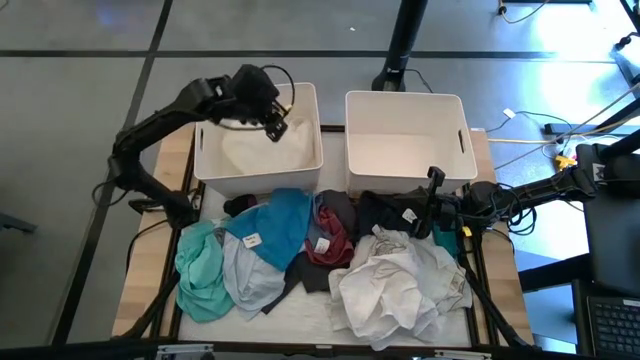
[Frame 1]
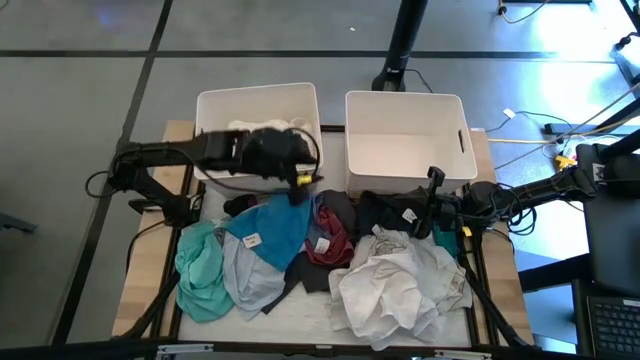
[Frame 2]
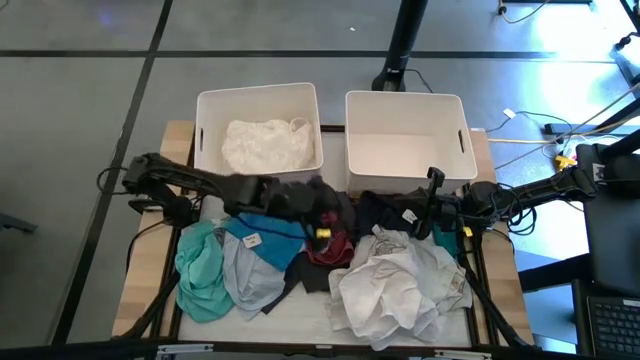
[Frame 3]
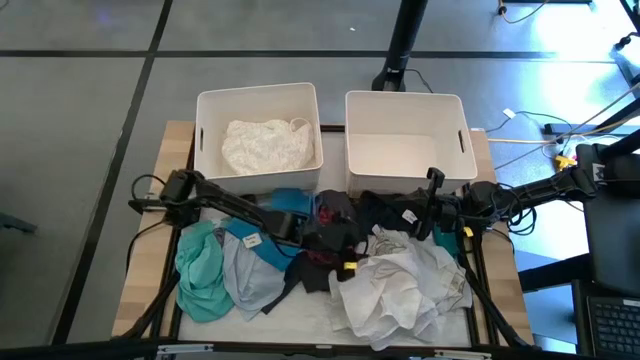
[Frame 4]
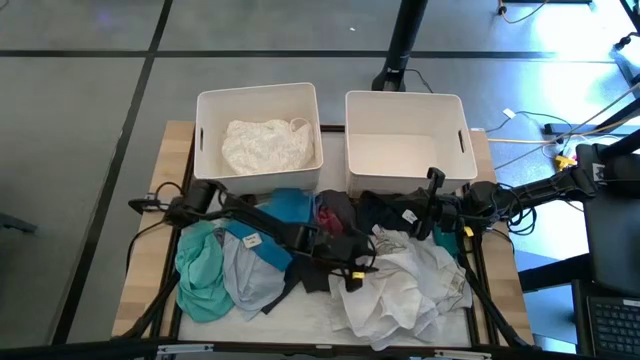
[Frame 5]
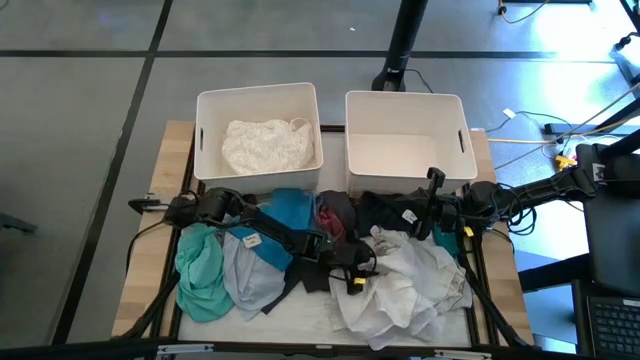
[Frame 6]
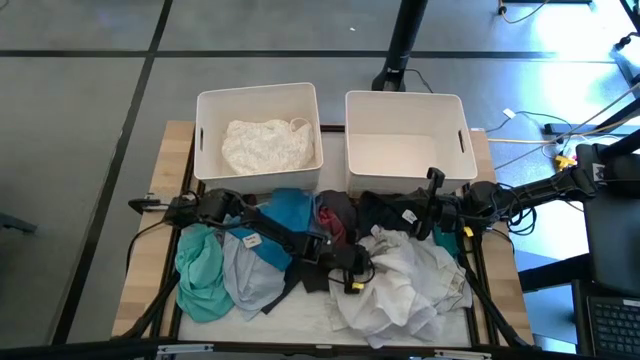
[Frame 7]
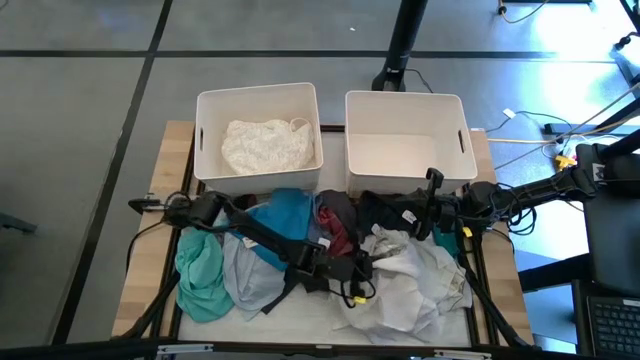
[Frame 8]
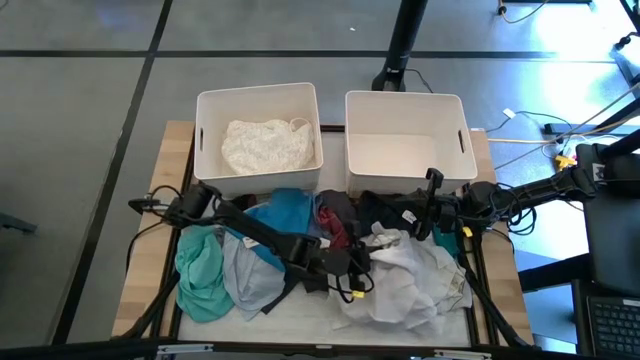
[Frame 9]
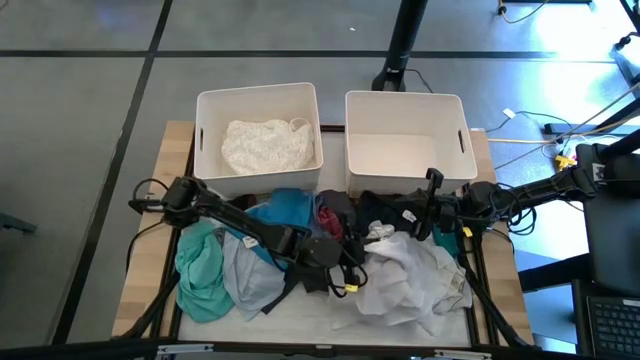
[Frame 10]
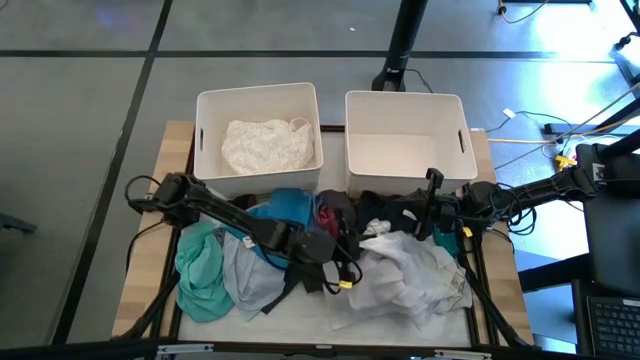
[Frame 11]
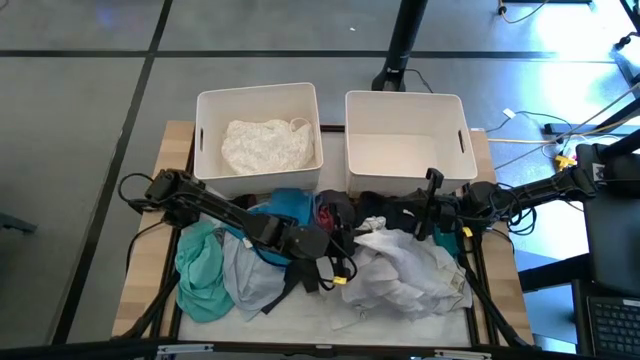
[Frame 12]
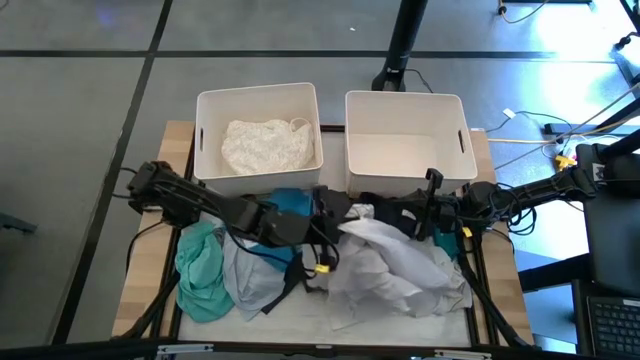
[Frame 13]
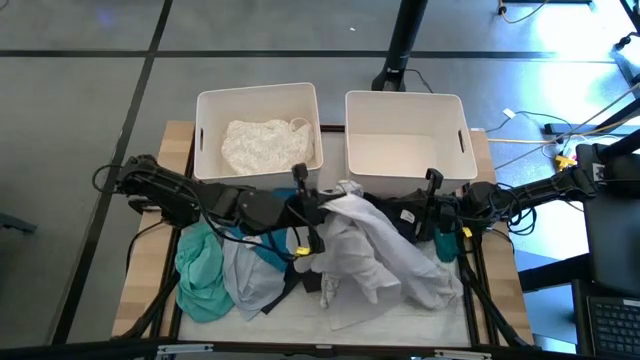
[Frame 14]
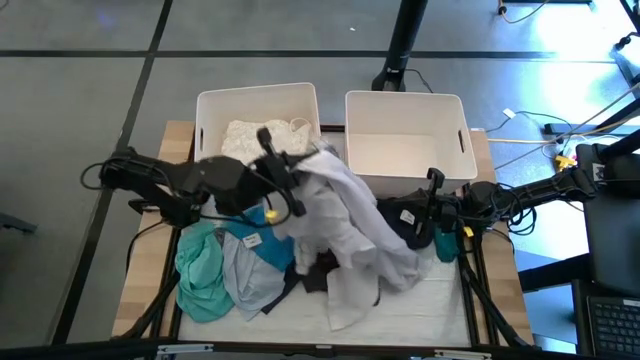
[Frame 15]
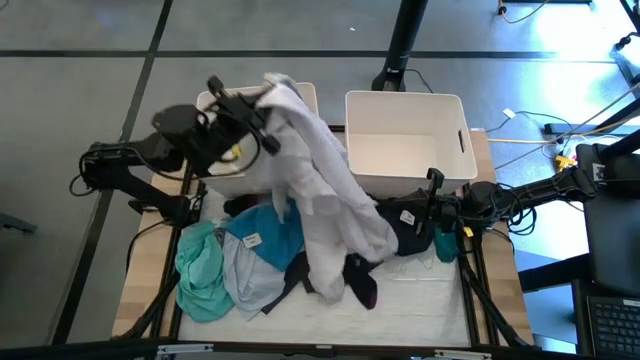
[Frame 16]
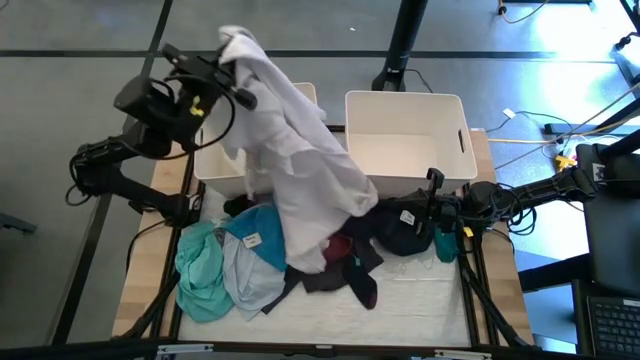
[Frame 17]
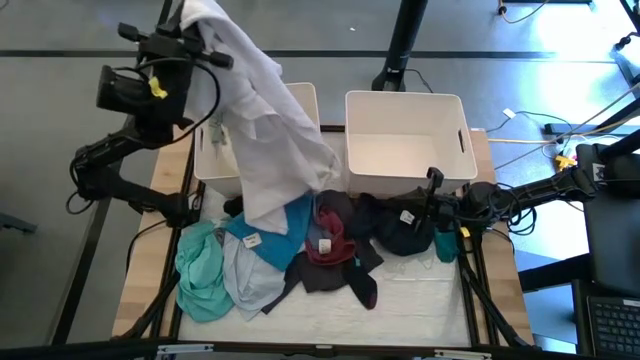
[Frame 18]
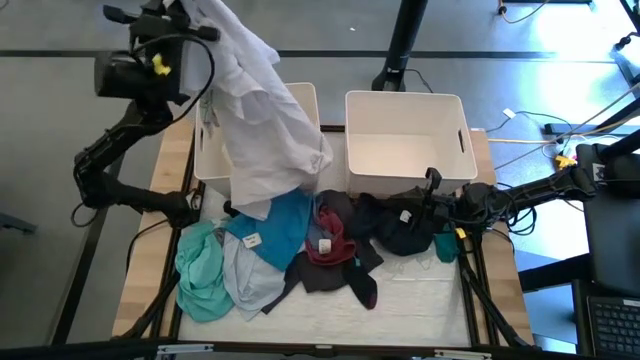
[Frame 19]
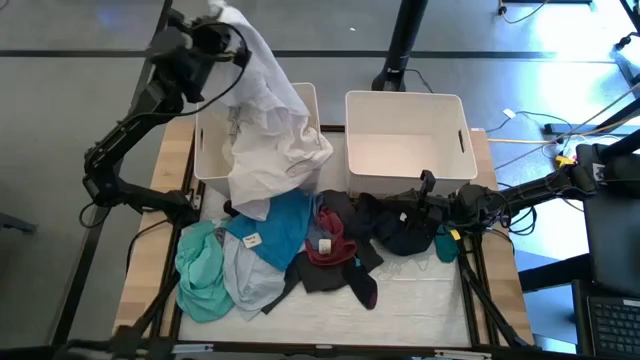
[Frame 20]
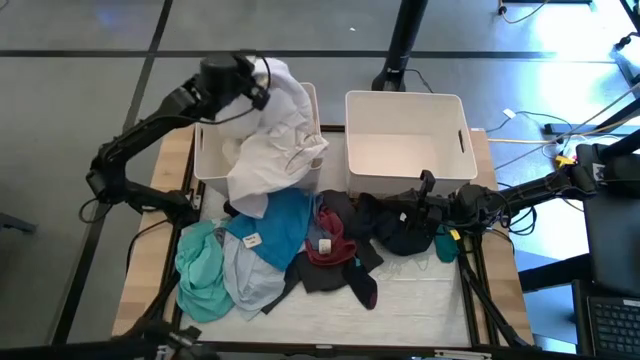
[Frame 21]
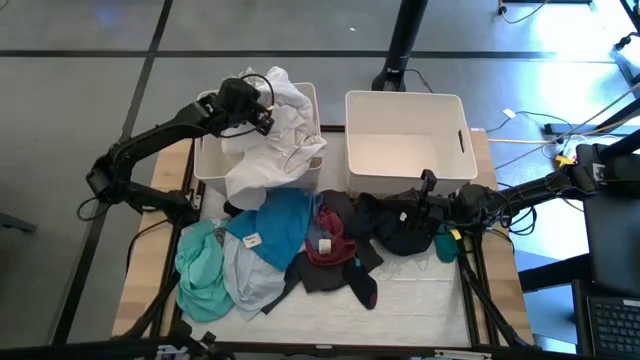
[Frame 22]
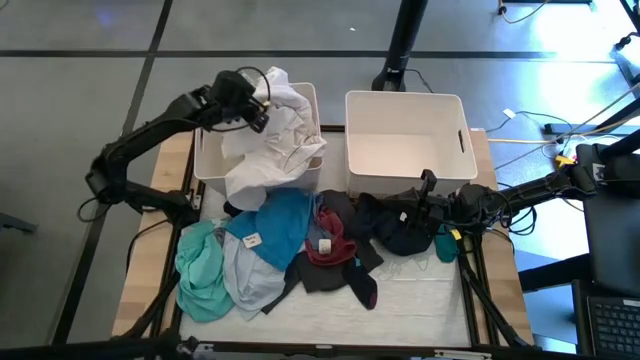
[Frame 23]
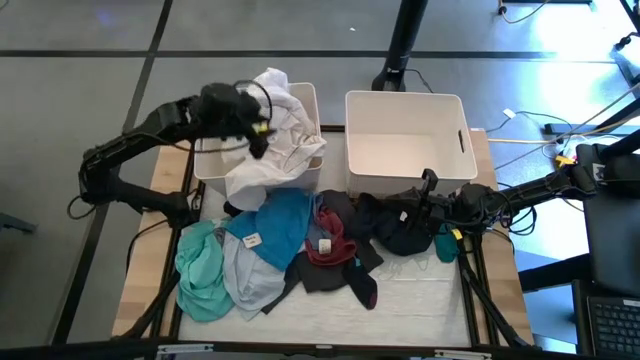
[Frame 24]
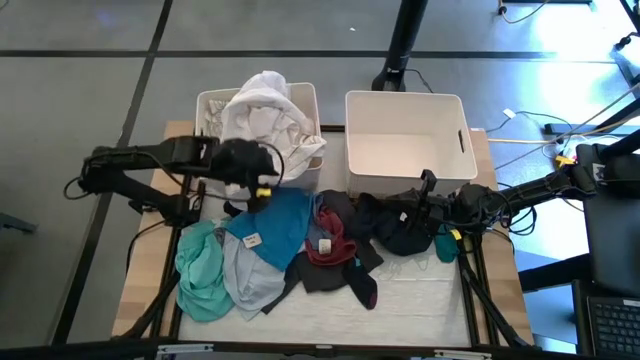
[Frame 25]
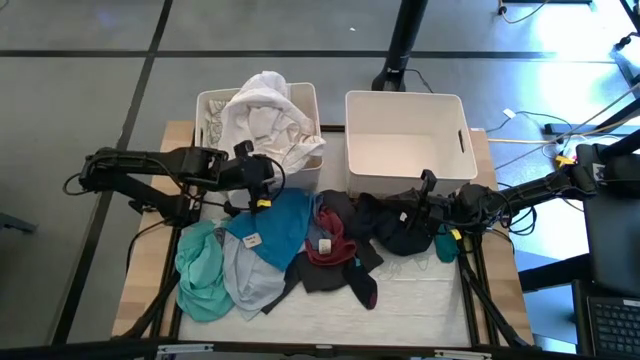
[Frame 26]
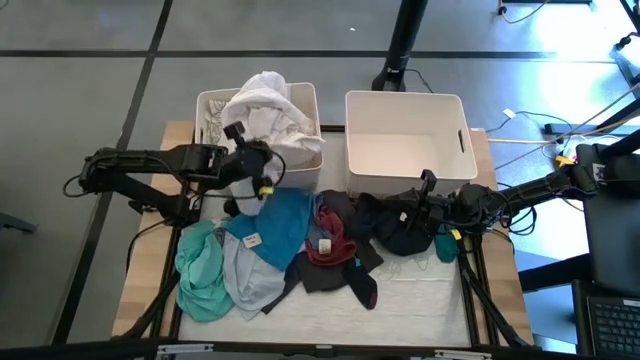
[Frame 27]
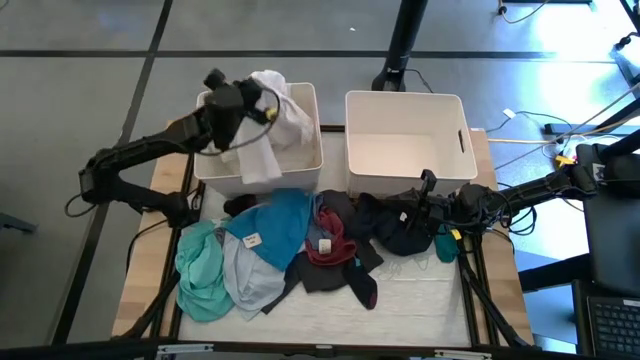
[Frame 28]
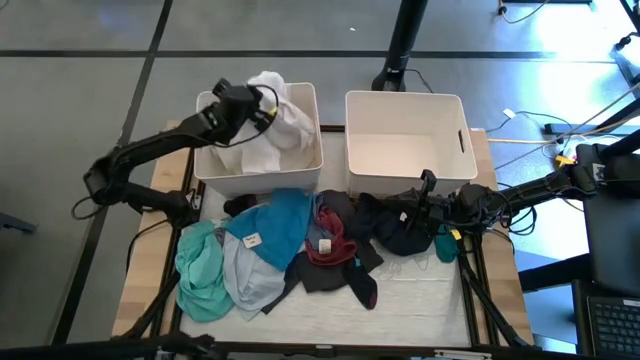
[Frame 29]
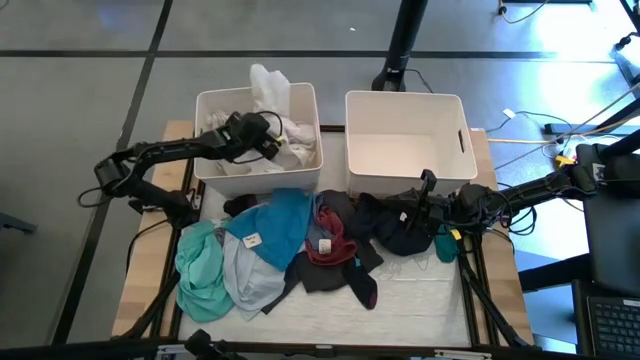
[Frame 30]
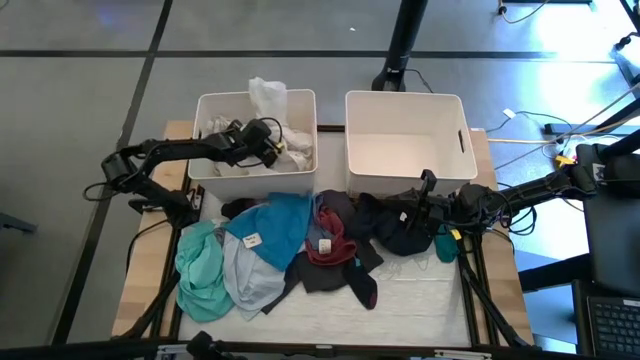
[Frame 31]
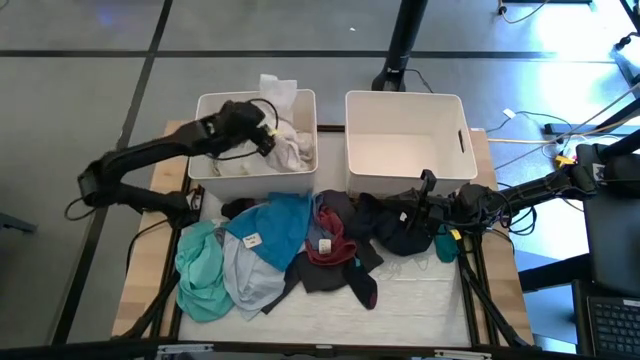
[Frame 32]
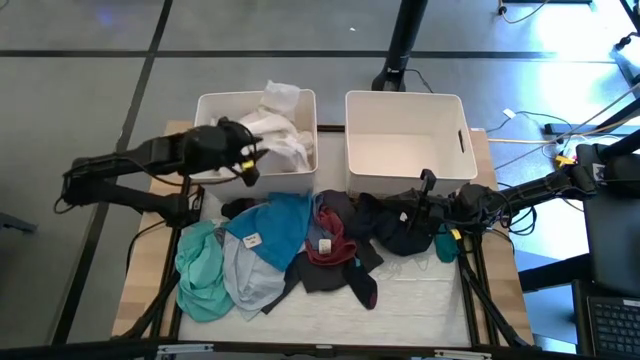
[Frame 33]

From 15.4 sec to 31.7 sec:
Task: Sort clothes
Put the white shirt into the left white bin

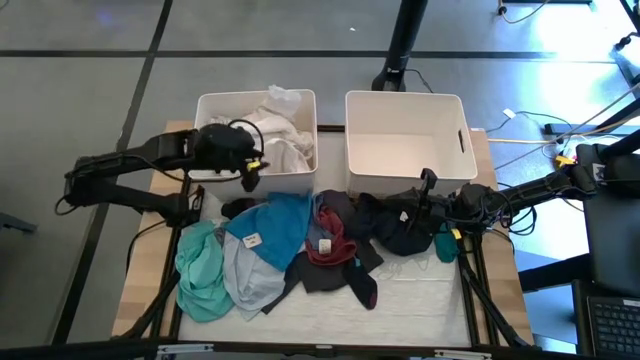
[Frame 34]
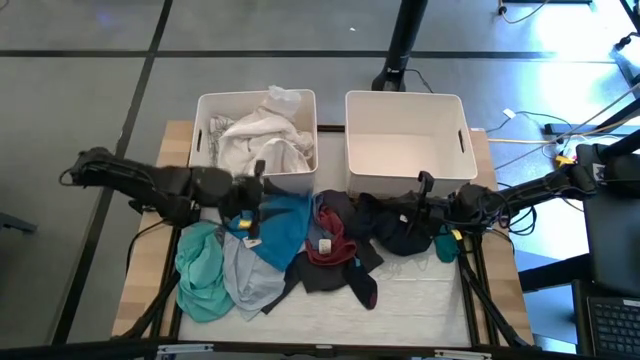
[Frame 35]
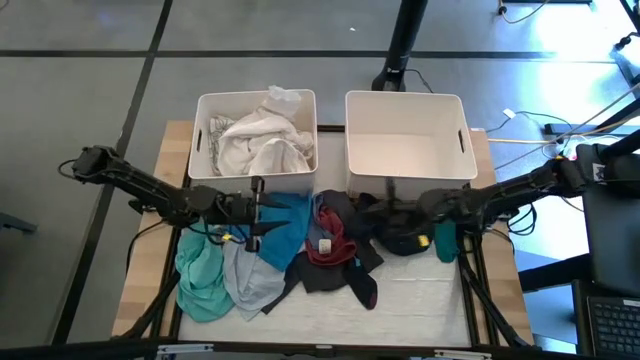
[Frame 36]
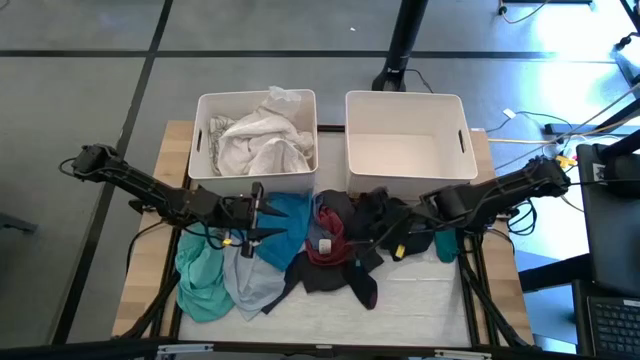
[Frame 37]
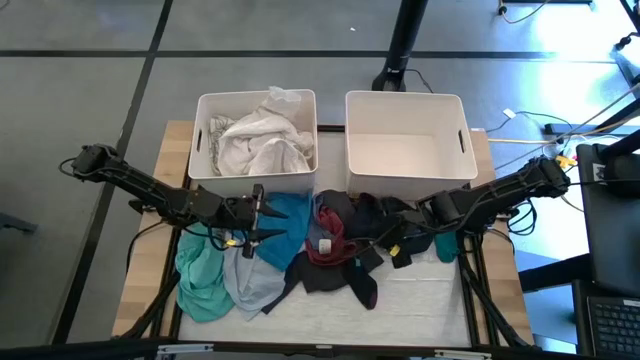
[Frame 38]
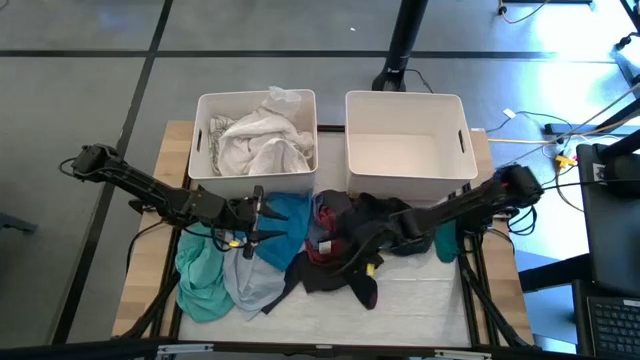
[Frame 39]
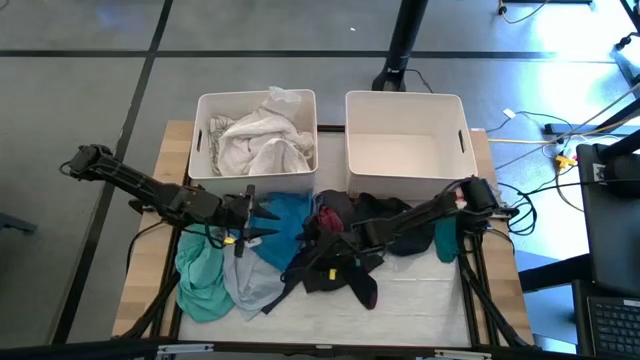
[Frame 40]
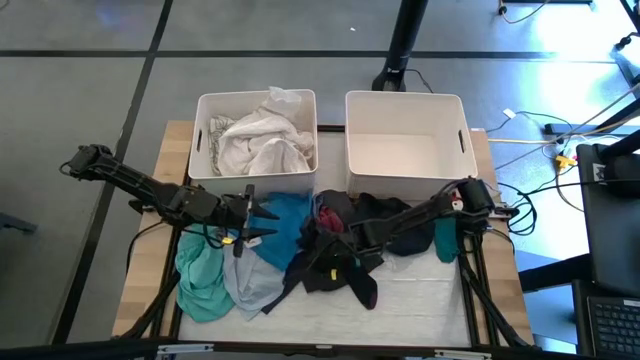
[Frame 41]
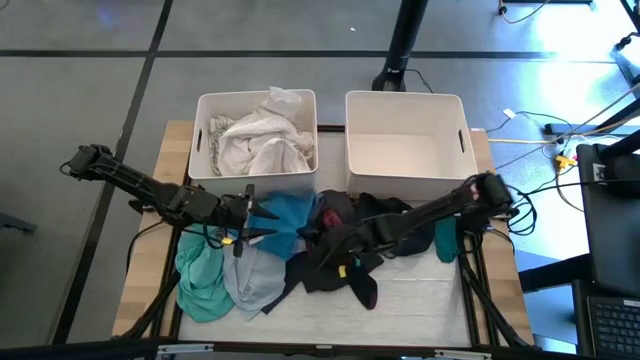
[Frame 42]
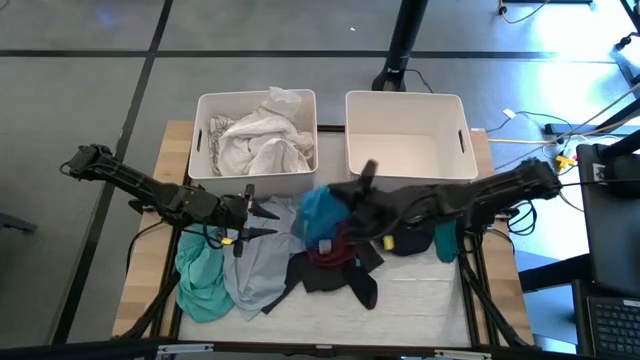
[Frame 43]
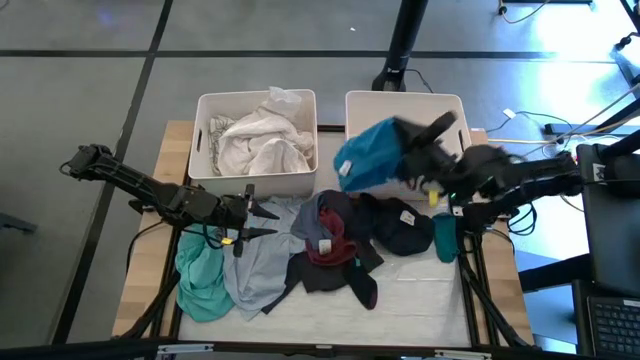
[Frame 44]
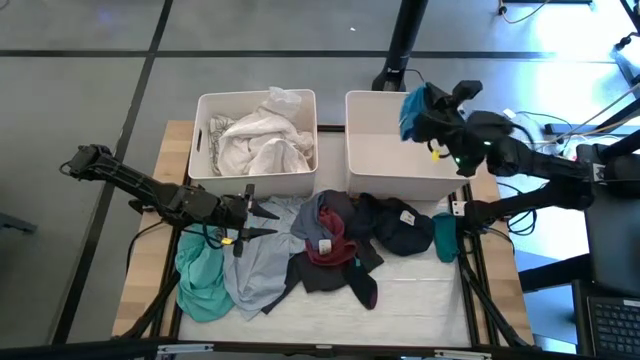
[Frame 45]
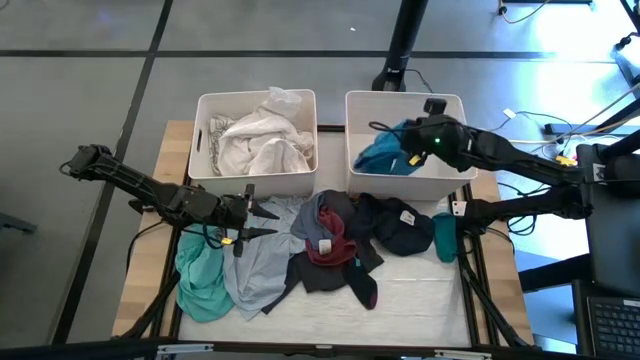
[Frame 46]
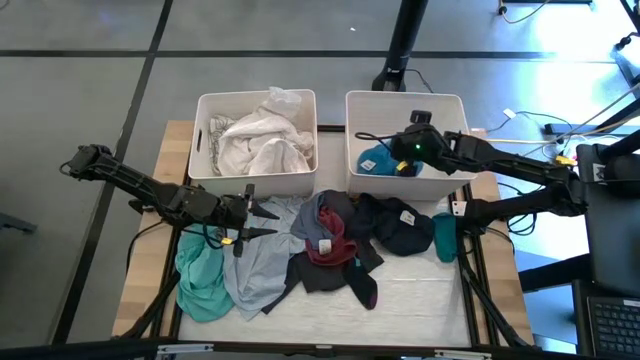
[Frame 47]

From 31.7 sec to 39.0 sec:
Put the blue shorts into the right white bin
